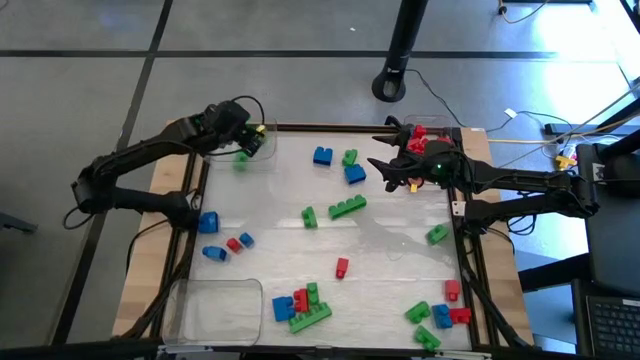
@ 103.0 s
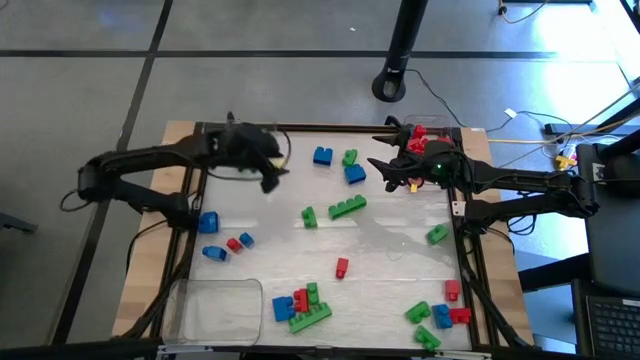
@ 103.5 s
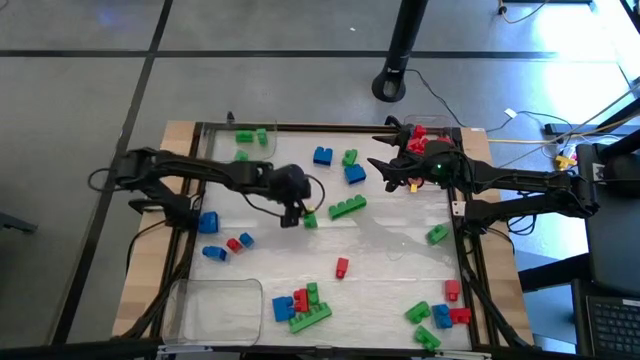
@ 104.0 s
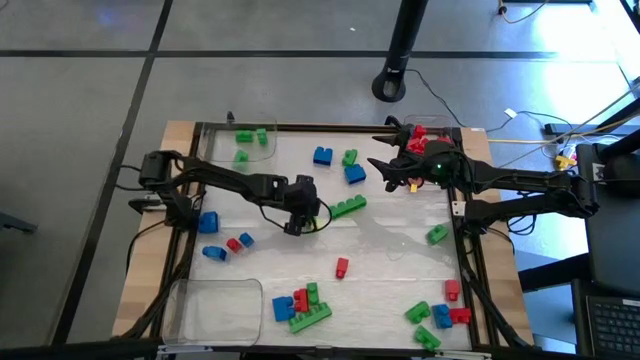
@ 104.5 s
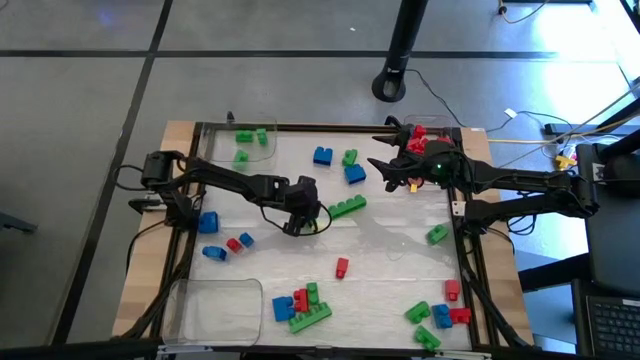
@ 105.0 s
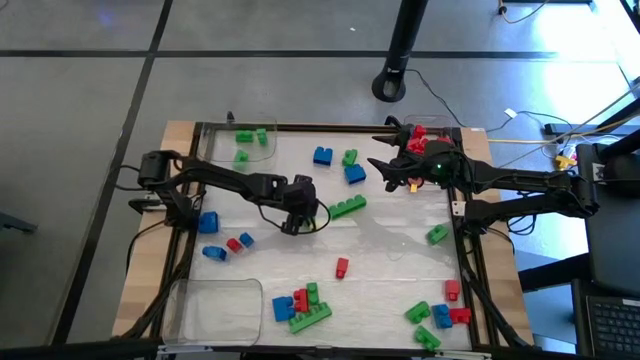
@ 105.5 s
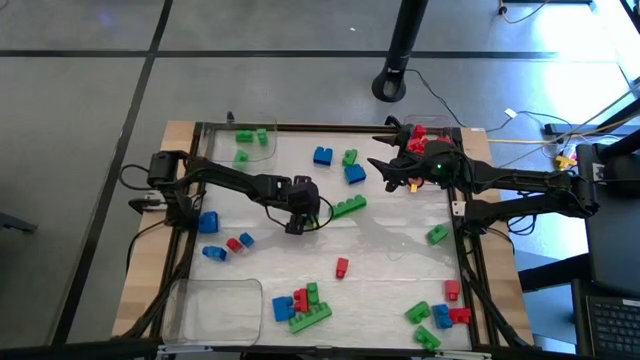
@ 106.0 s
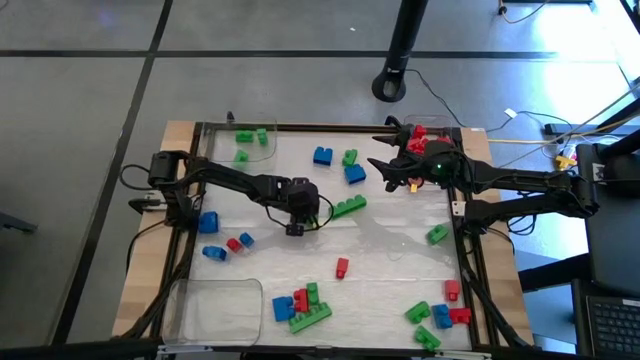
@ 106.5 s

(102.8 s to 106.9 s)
Task: Sort blocks
Put the green game piece into the left transparent bin

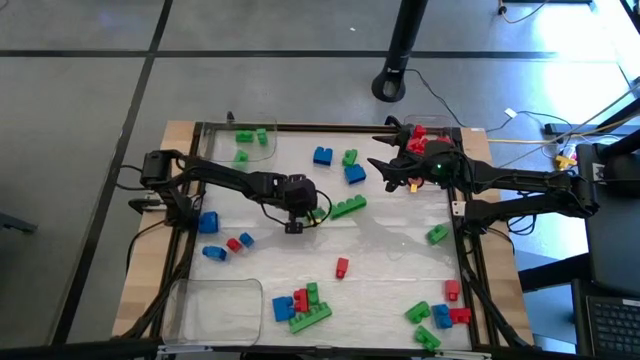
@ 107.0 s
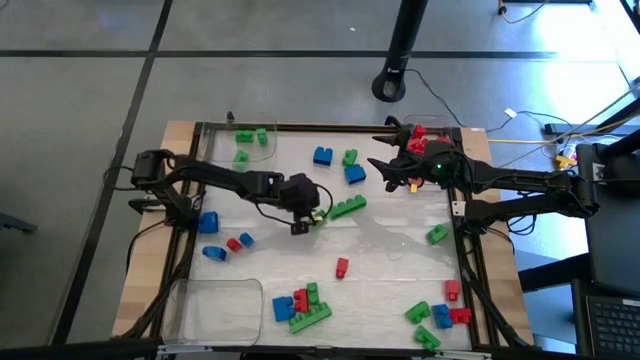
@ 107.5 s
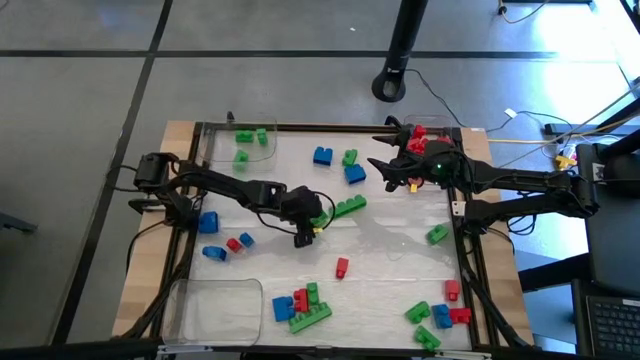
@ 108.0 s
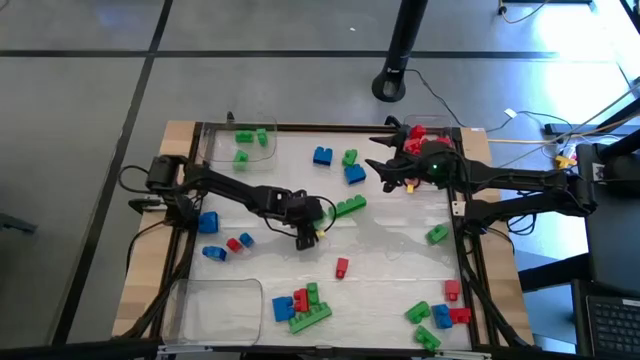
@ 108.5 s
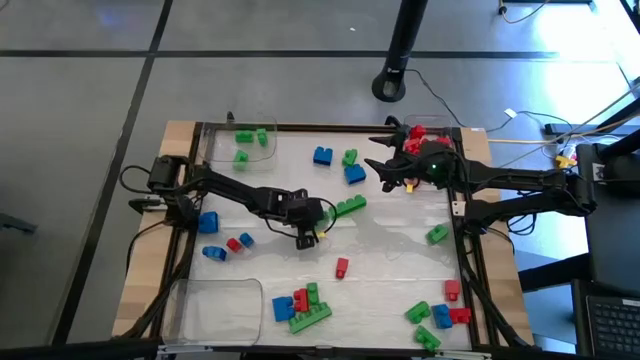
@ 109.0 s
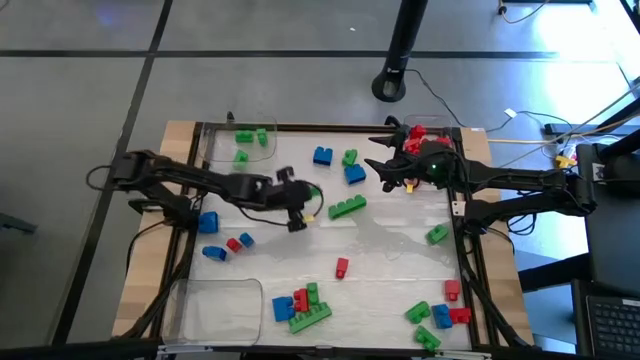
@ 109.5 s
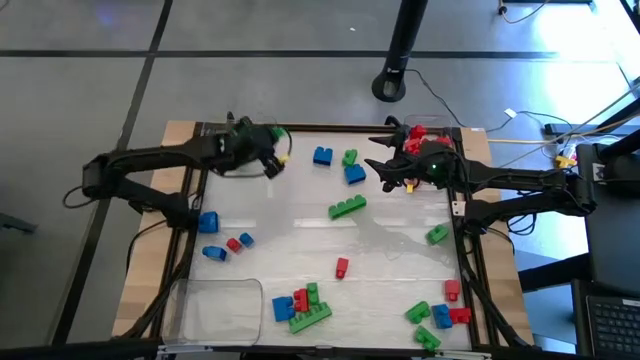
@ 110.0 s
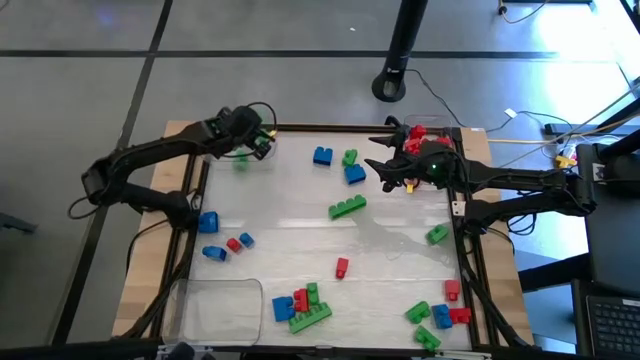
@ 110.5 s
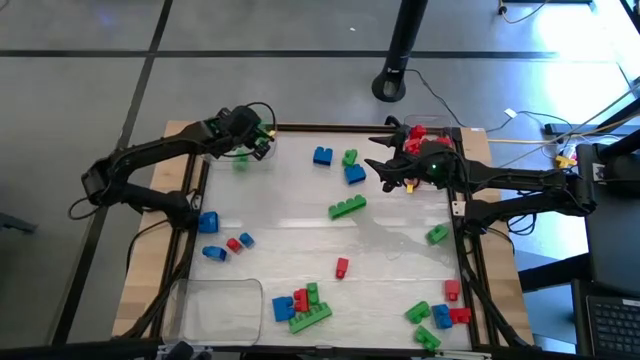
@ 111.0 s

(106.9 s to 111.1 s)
Put the green game piece into the left transparent bin

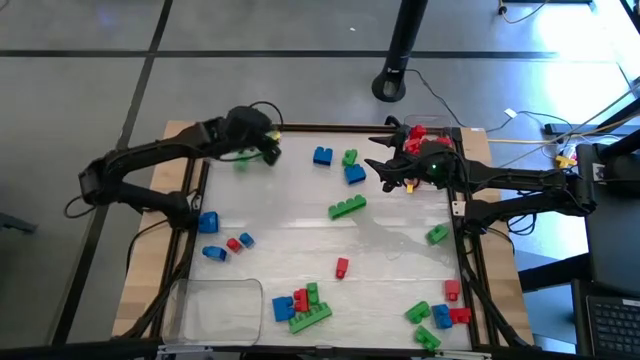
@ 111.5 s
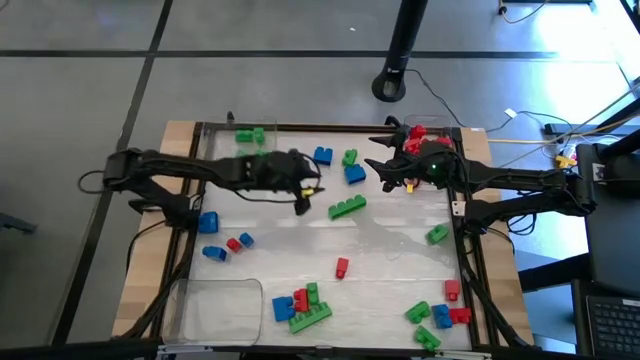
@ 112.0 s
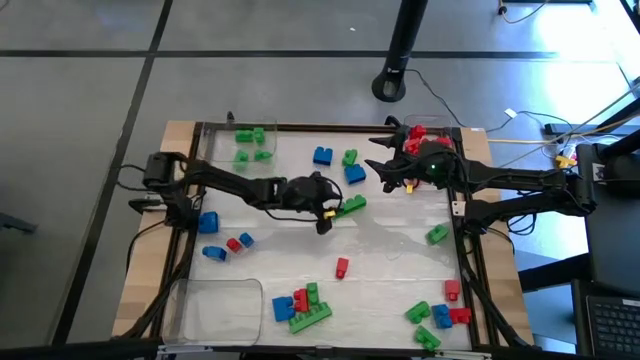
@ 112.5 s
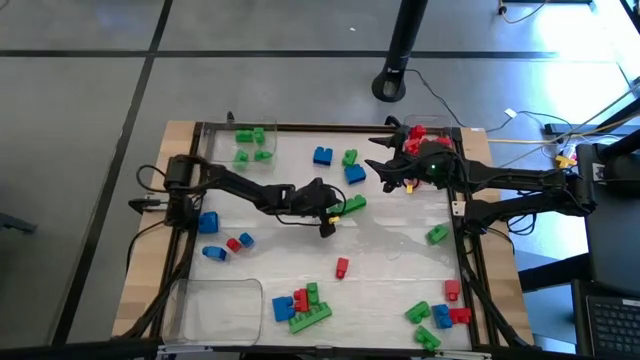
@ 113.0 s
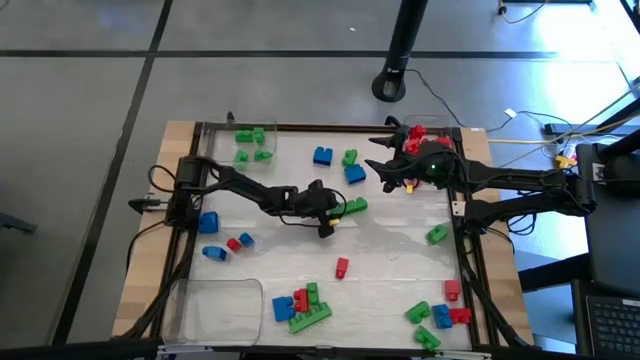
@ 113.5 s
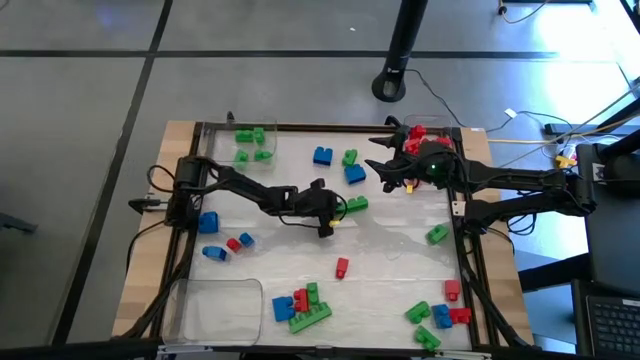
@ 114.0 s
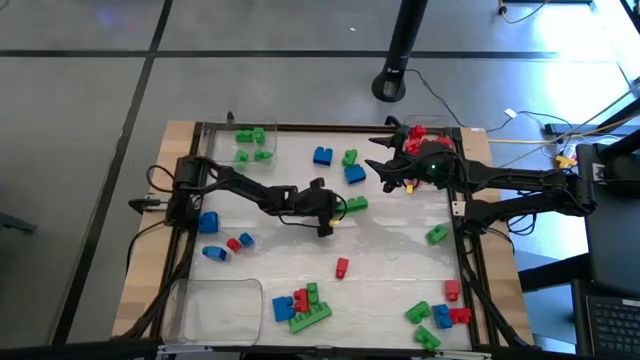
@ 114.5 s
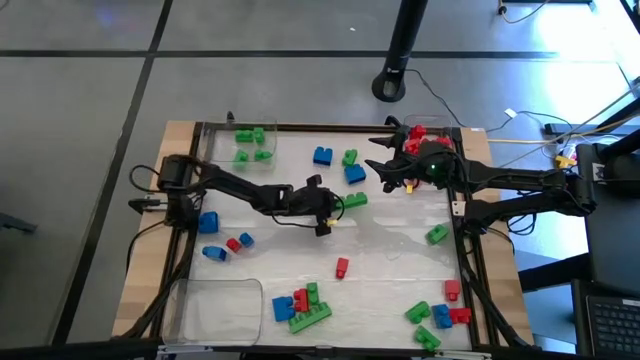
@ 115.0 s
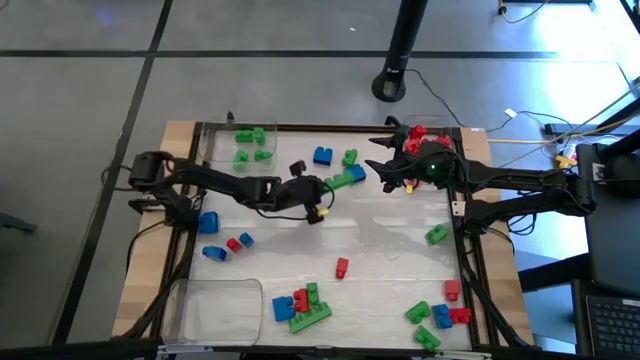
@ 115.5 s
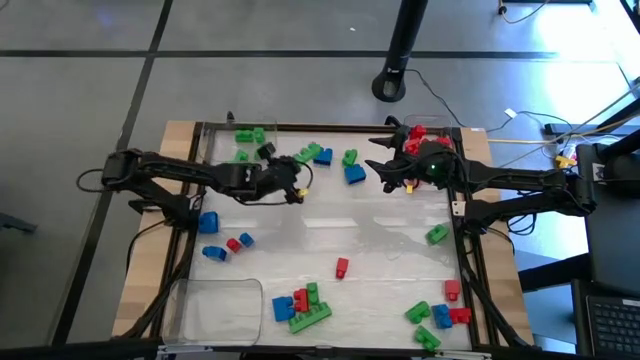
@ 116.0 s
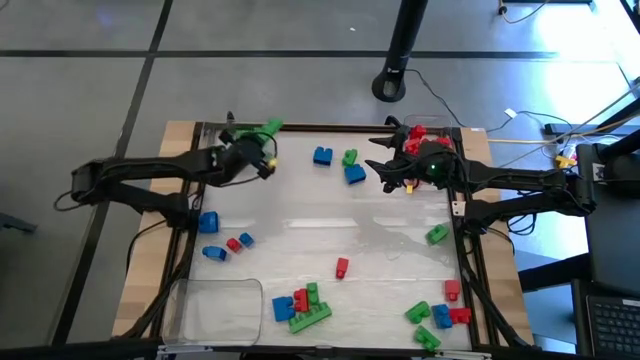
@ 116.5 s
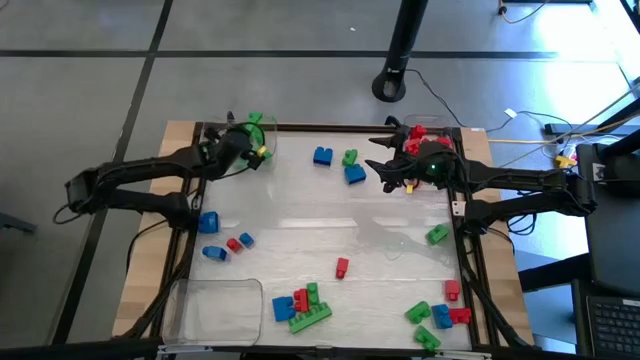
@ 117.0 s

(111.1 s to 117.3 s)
Put the green game piece into the left transparent bin

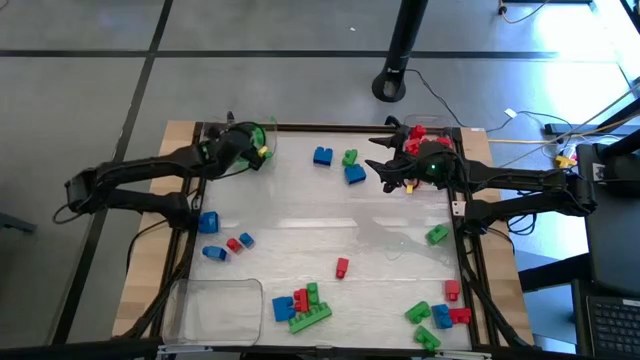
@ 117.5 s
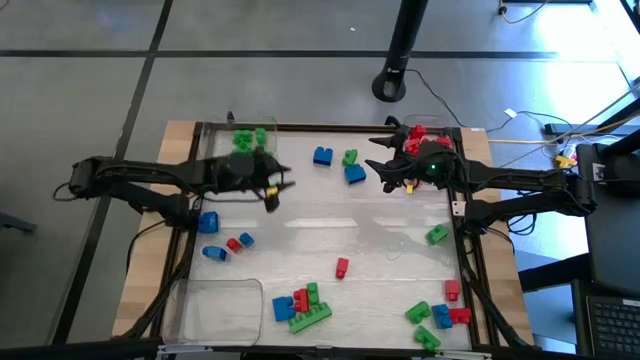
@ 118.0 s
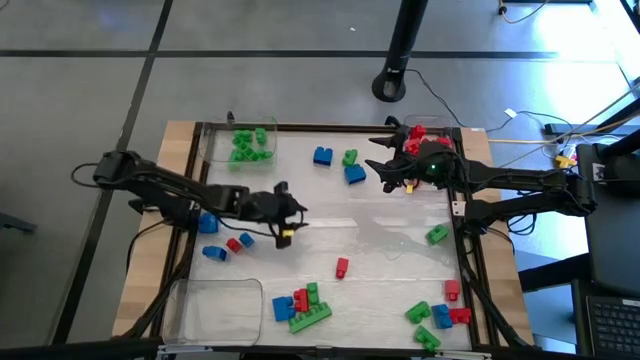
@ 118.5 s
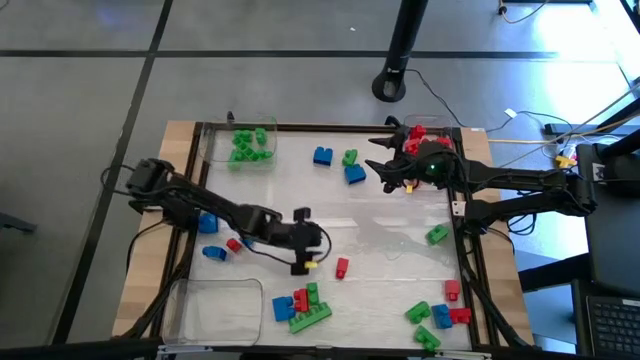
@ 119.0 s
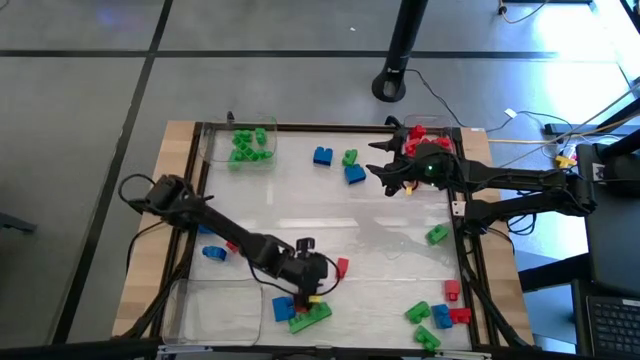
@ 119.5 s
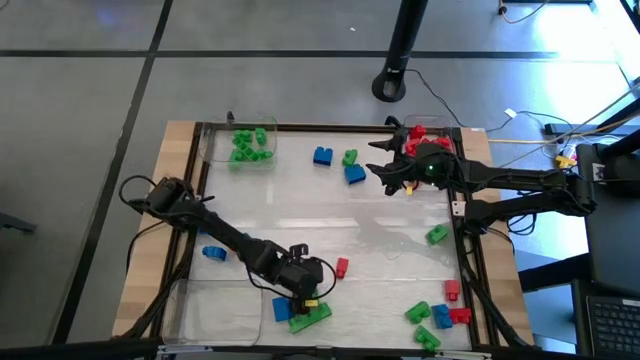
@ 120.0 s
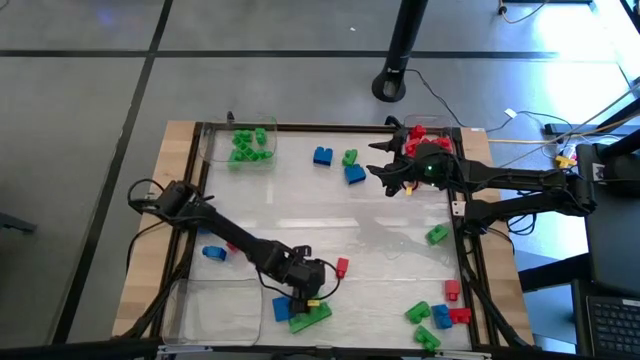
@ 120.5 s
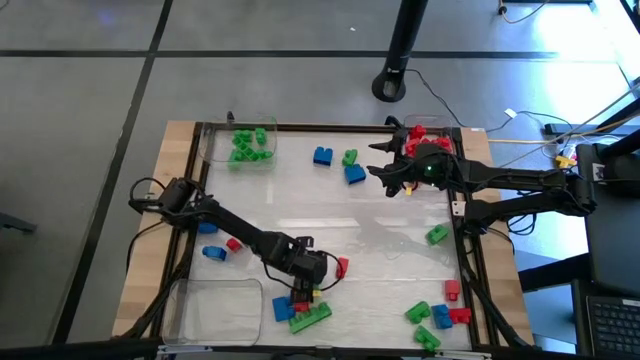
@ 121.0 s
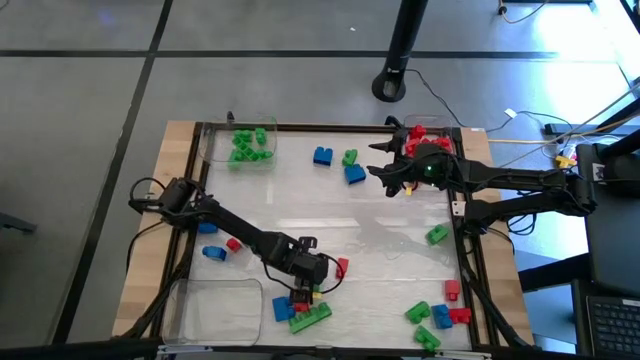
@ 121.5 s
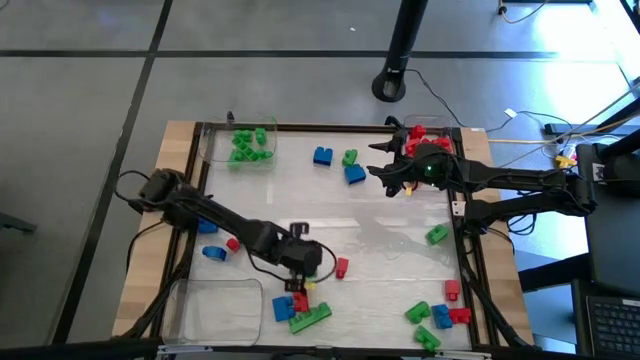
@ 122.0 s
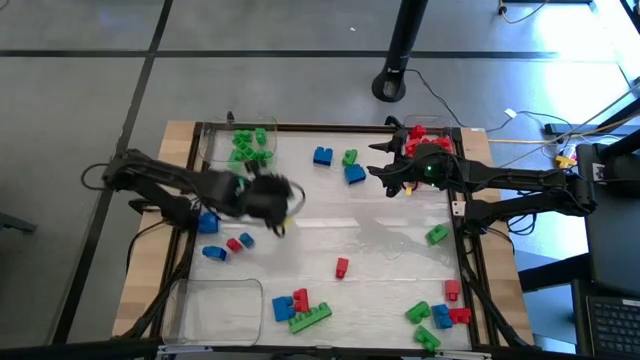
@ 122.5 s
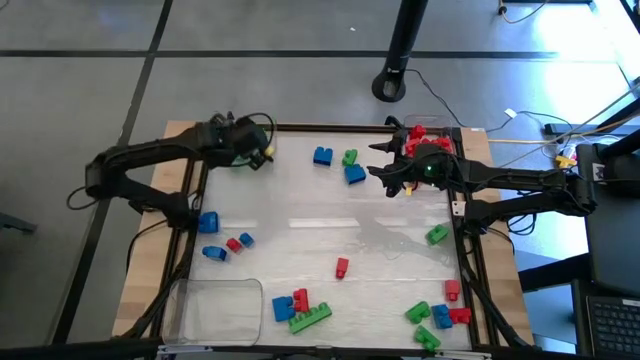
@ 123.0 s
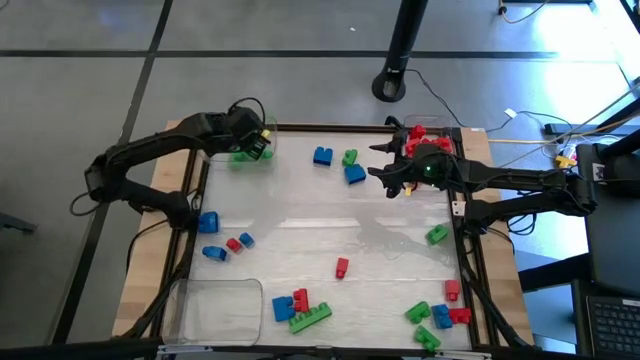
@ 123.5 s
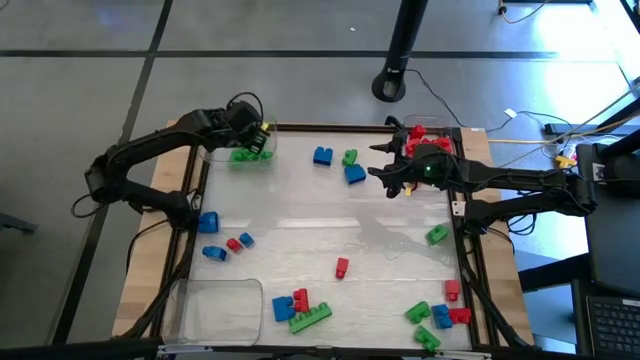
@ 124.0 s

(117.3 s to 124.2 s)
Put the green game piece into the left transparent bin
